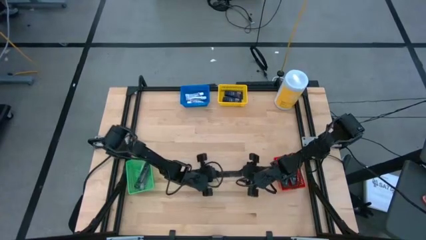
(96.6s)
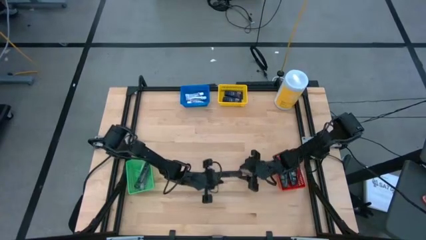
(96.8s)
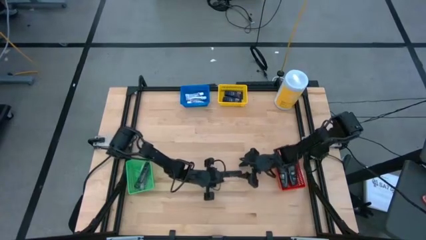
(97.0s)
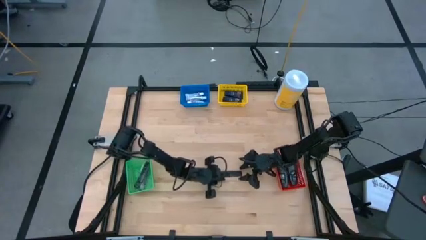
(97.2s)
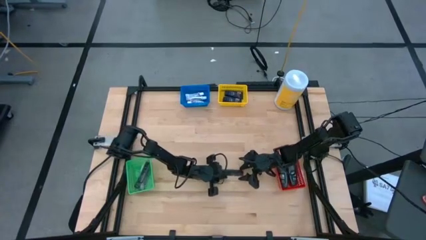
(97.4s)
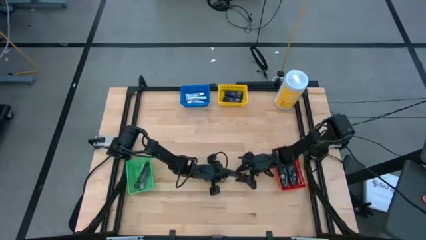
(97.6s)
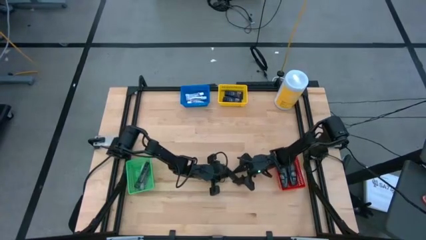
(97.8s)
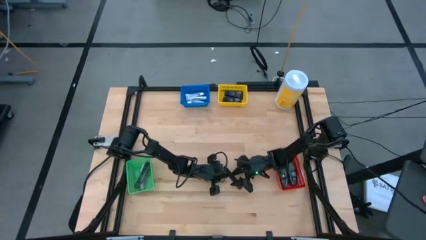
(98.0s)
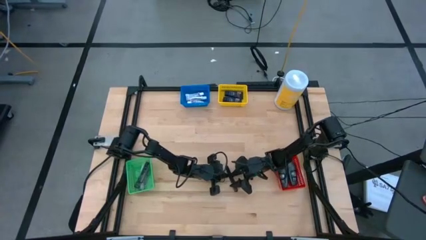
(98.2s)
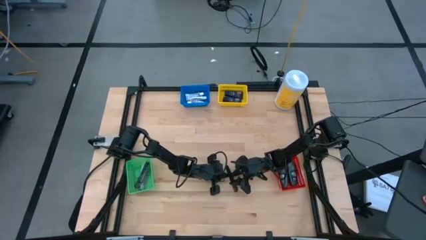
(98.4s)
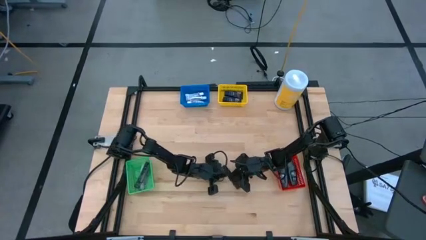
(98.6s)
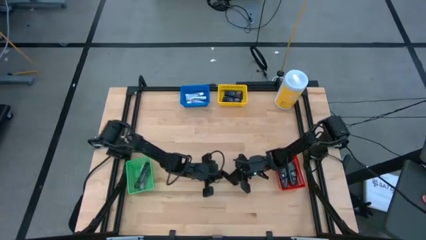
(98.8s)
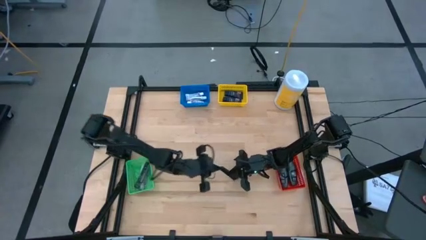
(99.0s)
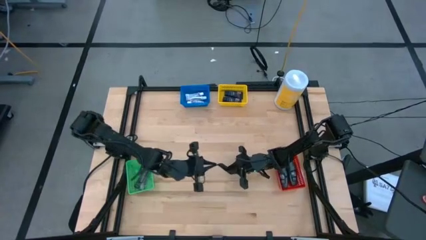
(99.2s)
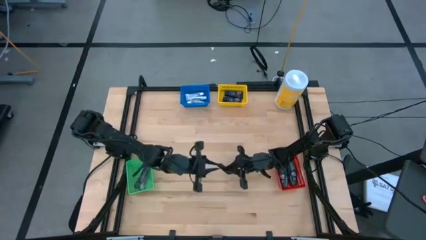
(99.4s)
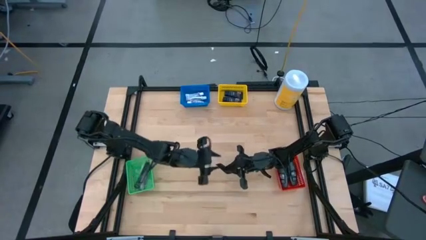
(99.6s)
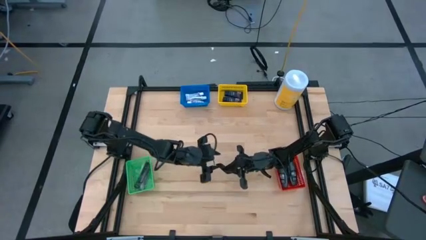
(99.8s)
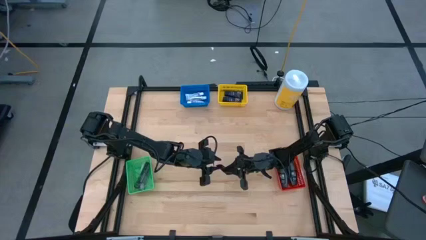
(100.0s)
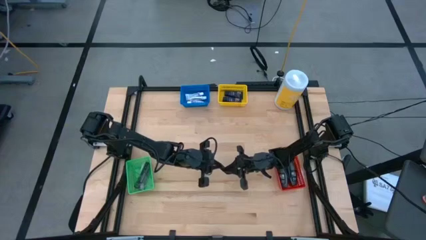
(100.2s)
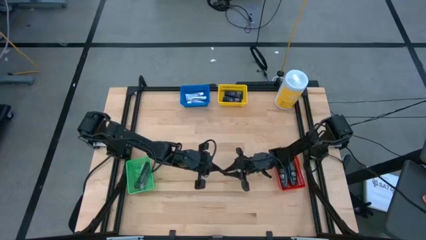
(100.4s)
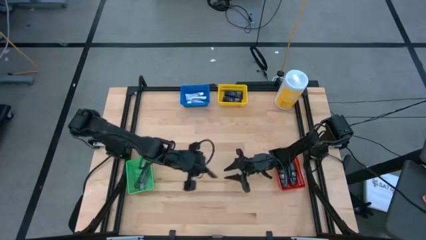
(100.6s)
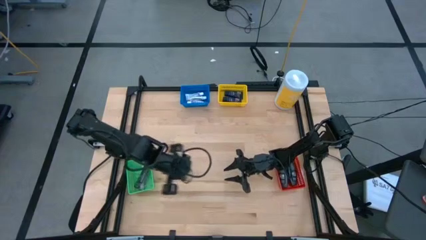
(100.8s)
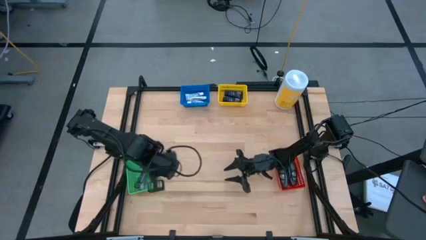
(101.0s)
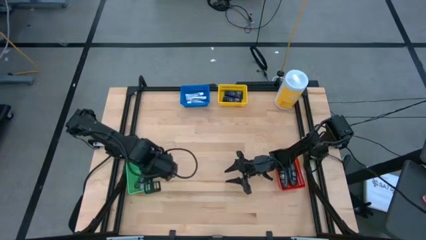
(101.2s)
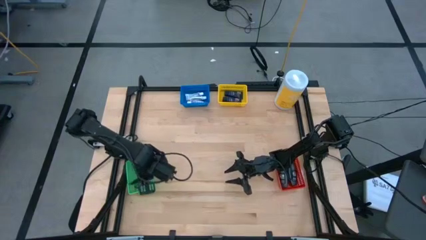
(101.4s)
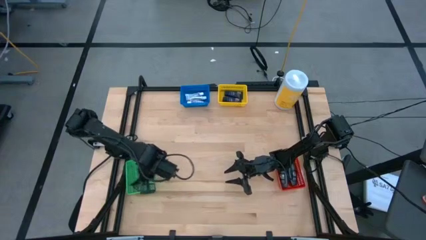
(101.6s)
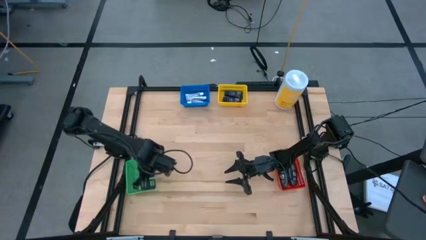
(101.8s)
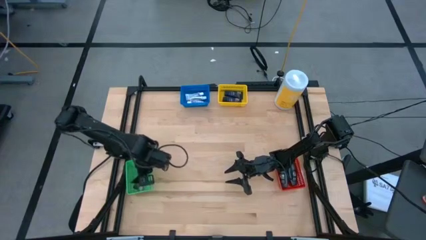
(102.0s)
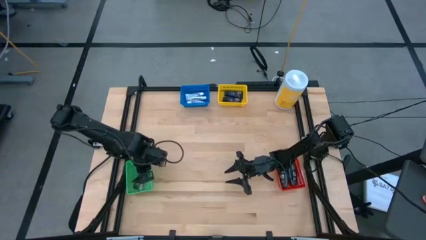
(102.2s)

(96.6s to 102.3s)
Task: Pick & Place Travel size toiletries
Put the black hair comb into the green bin

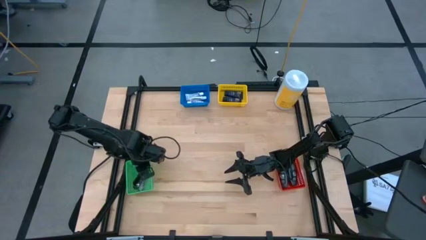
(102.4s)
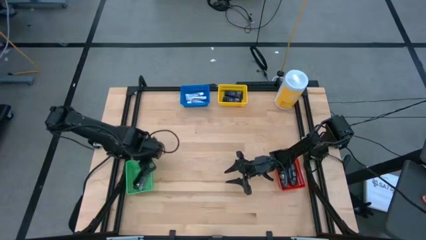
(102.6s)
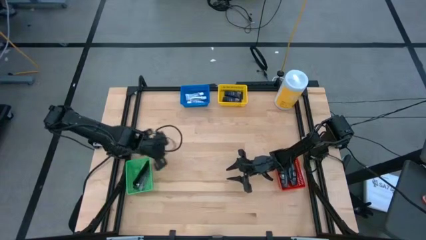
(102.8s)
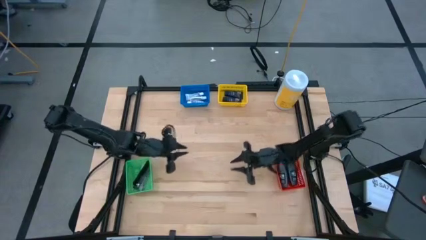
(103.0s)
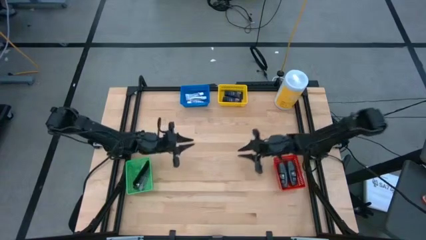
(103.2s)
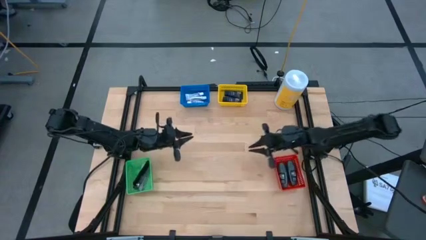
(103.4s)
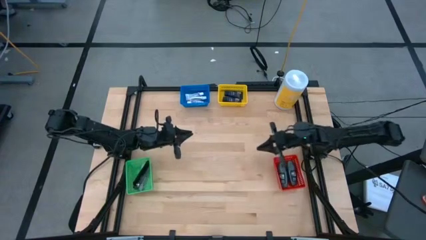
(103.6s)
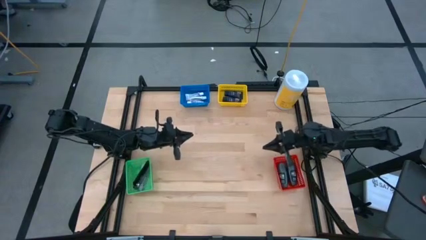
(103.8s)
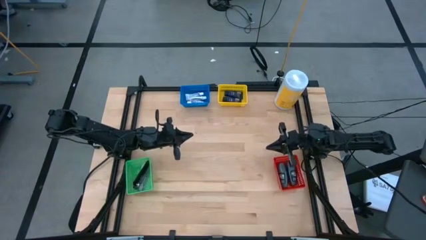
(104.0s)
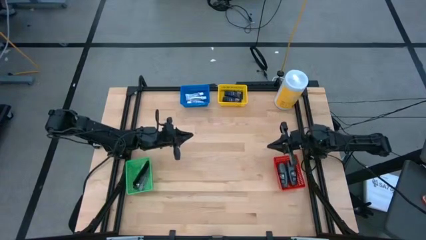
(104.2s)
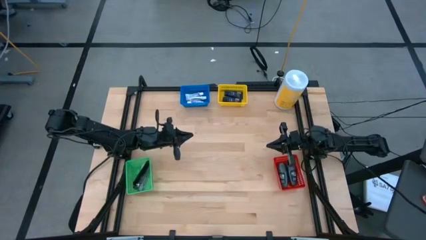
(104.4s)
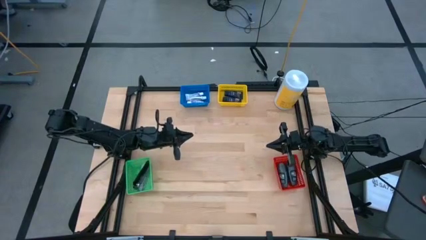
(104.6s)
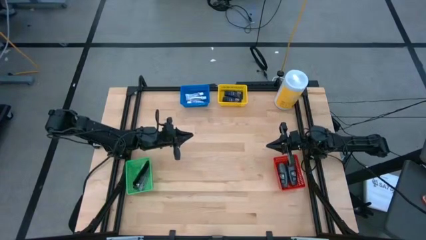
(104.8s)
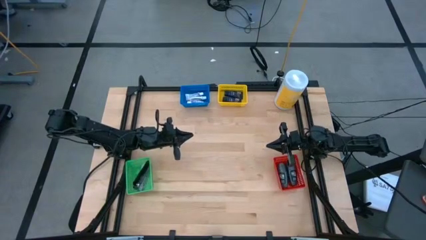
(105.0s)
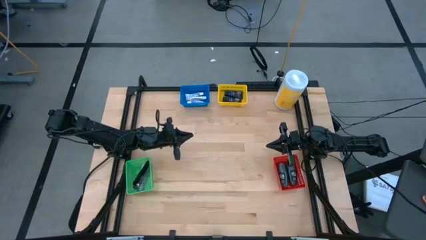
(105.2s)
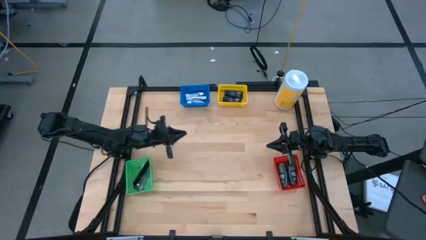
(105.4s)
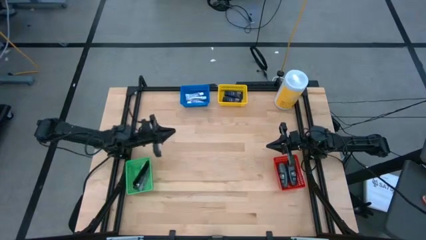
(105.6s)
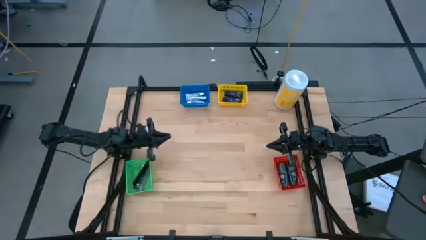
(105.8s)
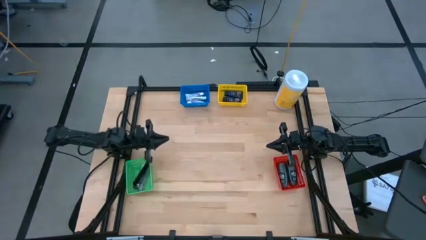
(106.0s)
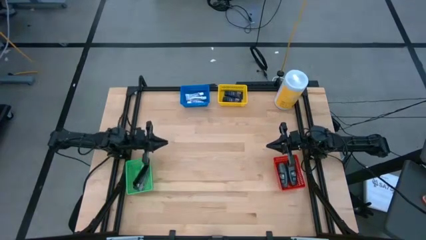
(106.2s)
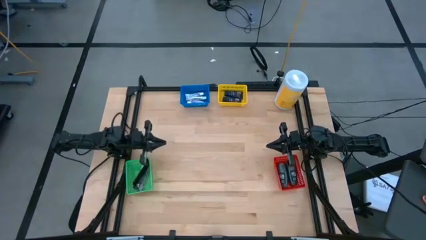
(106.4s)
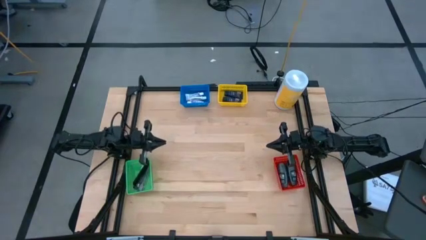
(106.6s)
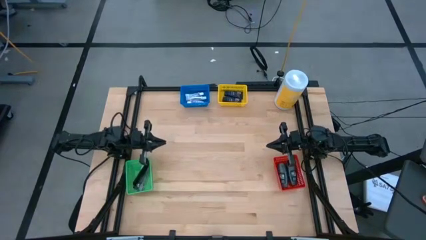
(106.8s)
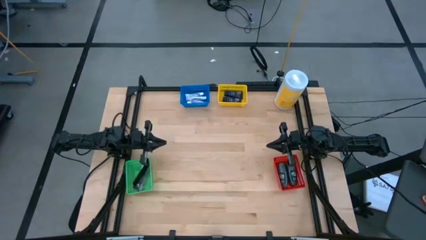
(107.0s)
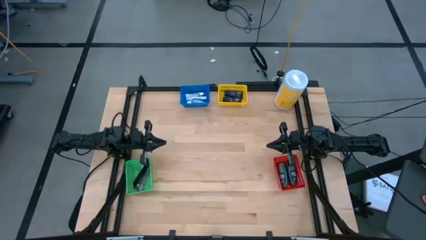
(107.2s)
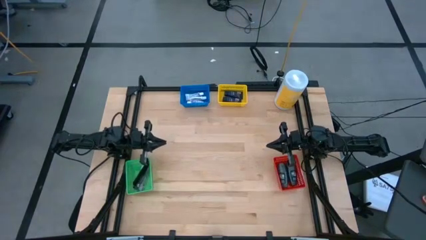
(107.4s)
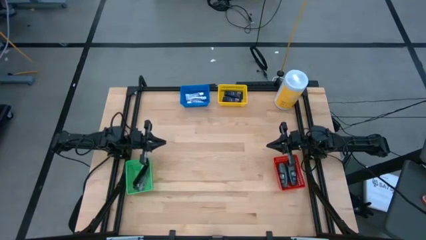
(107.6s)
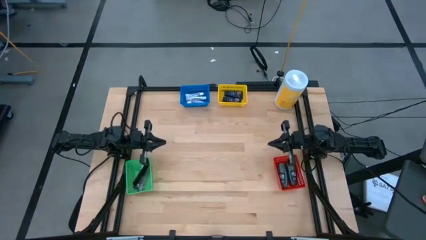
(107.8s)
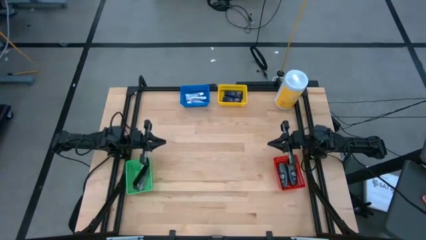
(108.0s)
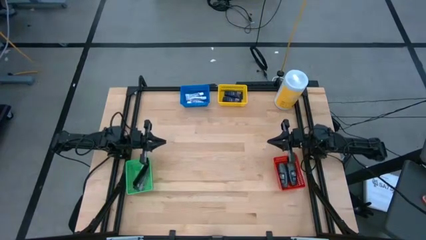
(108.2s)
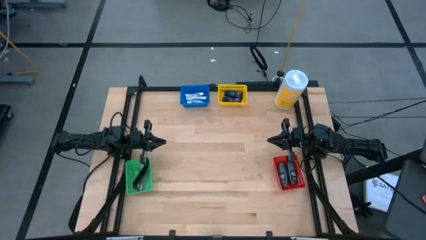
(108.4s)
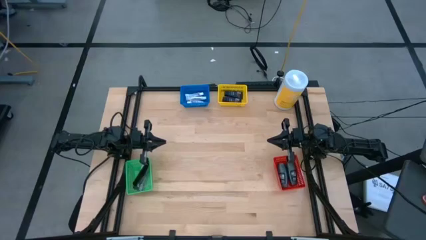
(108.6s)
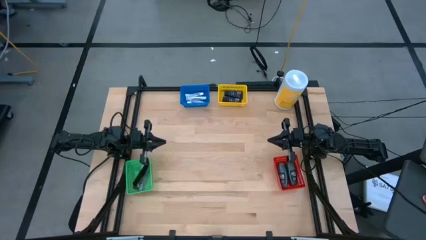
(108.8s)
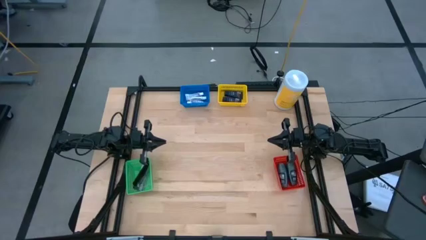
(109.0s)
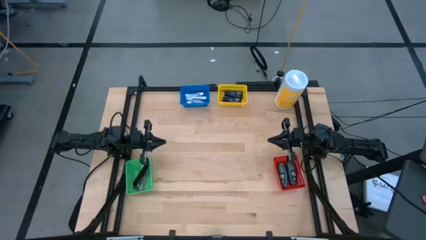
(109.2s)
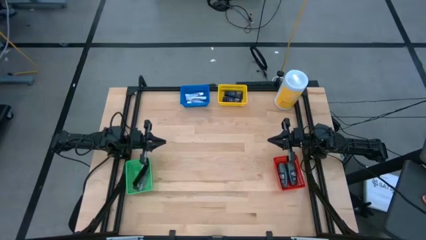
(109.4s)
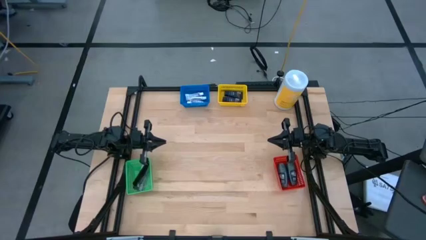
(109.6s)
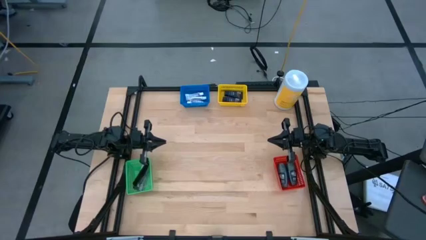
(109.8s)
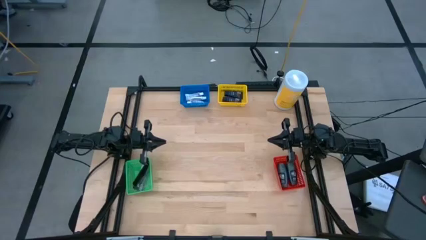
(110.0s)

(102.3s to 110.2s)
Return to Home Position

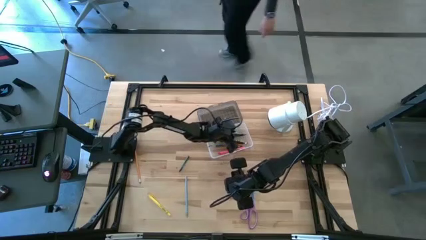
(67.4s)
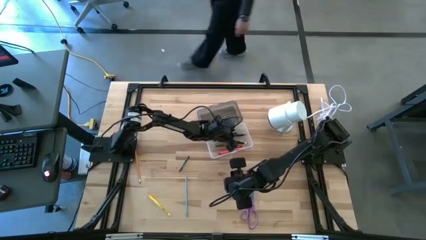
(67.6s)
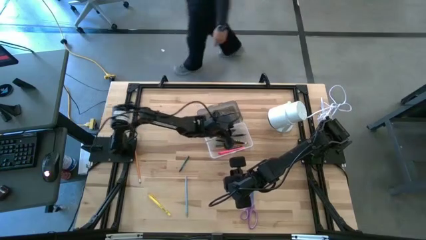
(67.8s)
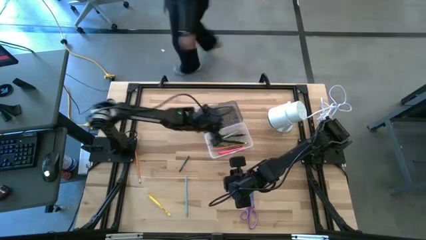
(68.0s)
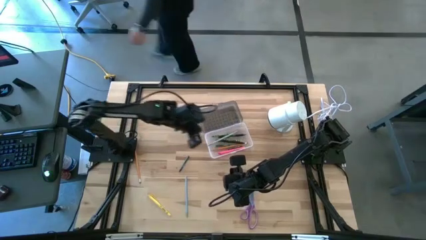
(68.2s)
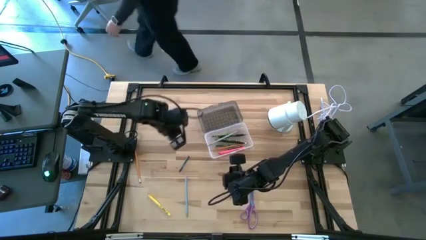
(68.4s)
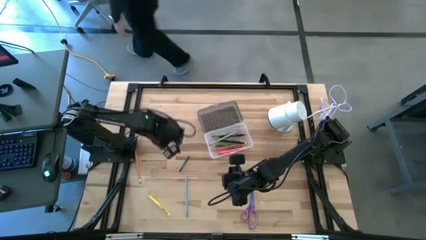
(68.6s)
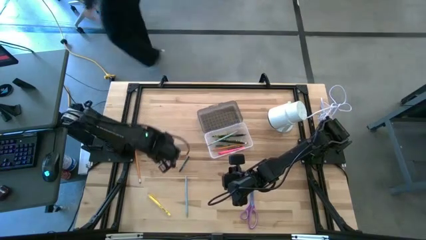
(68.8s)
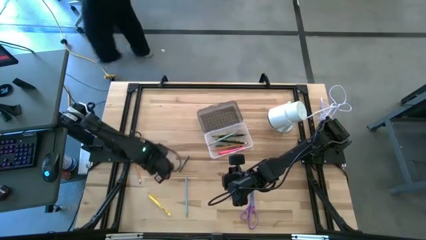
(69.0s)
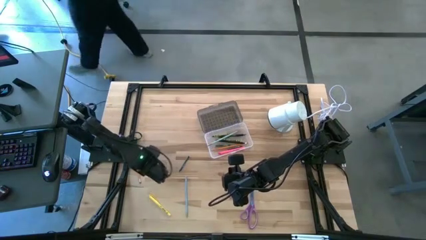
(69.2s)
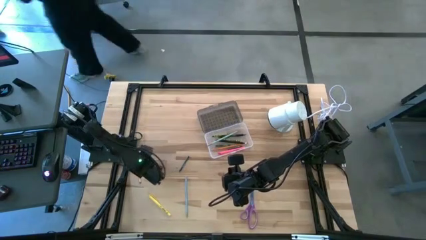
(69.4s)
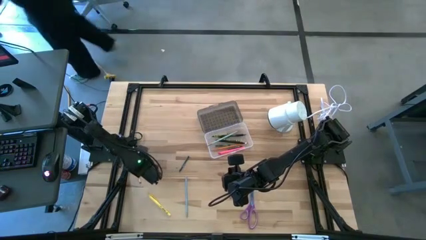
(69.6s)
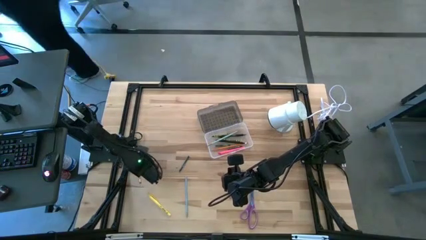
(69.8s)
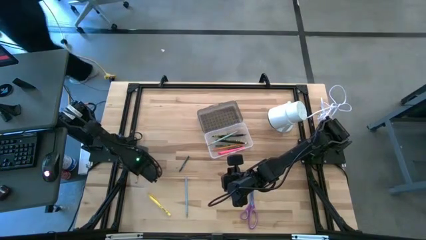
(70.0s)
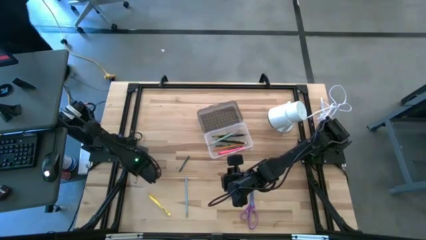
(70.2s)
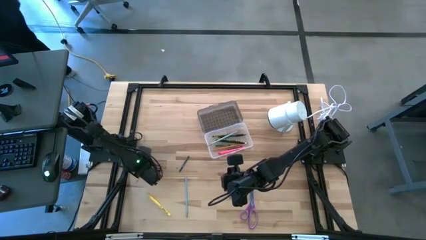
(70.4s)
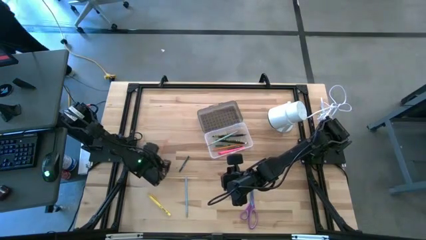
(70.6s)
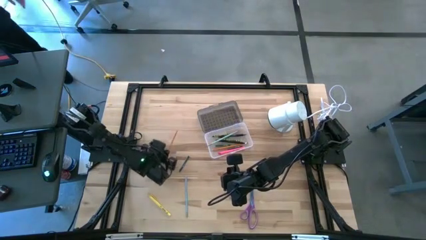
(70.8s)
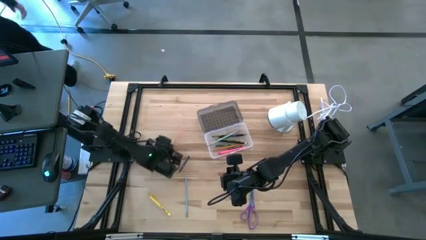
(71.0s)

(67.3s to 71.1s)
Task: Pick & place school supplies into a supply box
Put the orange pencil into the gray supply box
